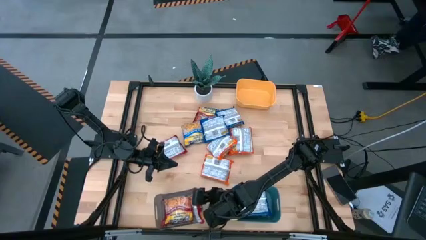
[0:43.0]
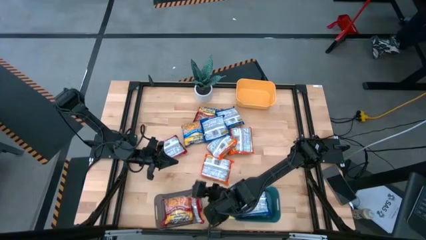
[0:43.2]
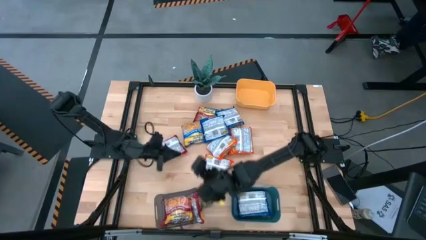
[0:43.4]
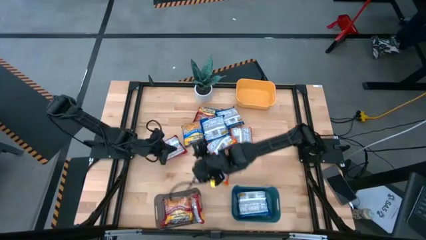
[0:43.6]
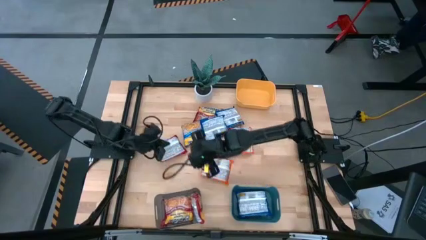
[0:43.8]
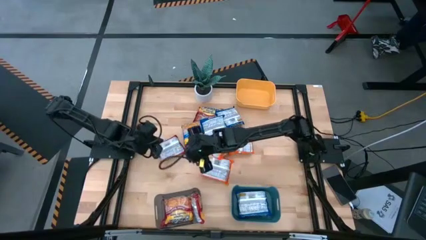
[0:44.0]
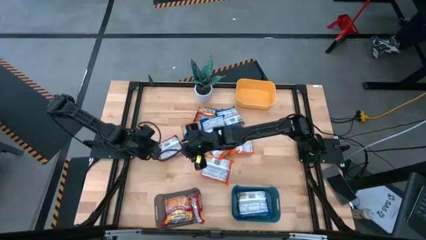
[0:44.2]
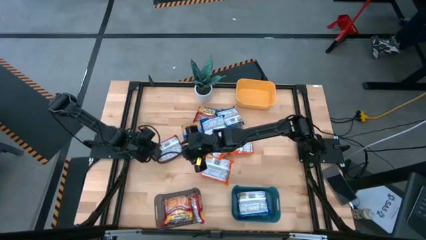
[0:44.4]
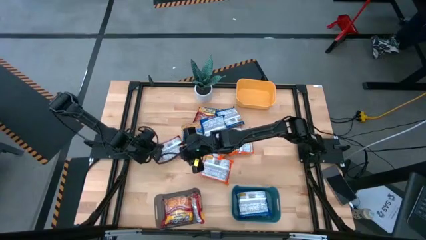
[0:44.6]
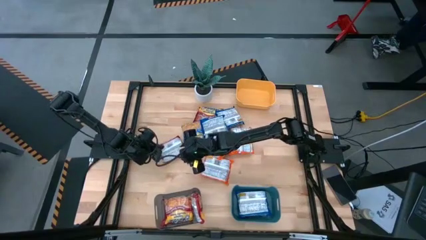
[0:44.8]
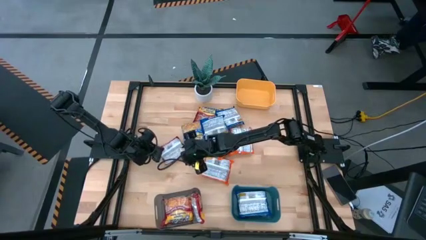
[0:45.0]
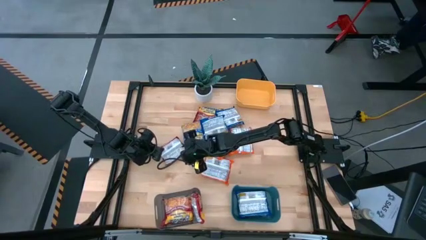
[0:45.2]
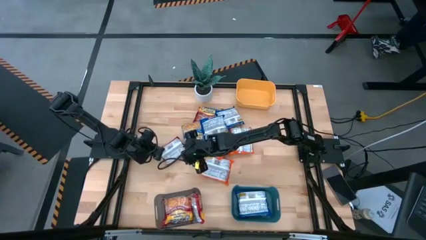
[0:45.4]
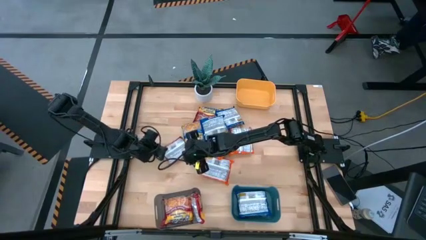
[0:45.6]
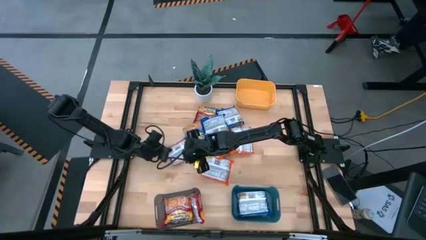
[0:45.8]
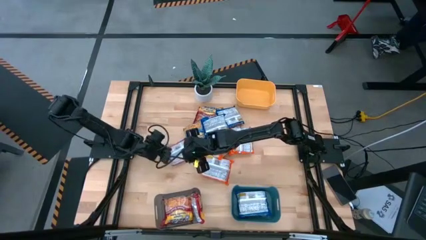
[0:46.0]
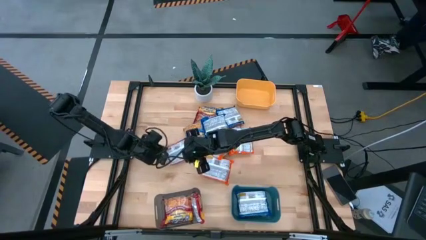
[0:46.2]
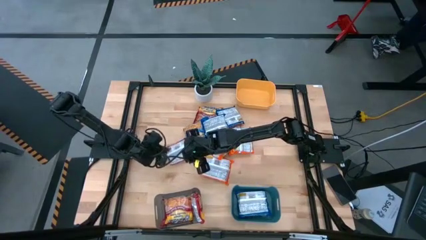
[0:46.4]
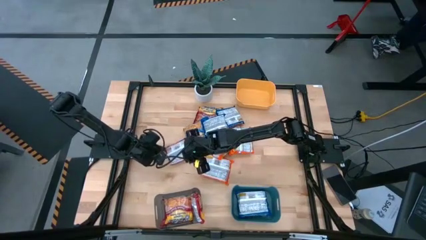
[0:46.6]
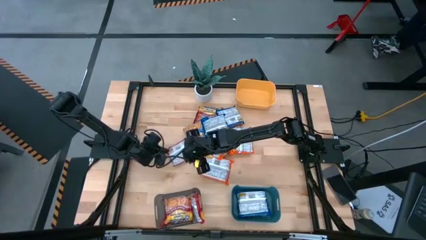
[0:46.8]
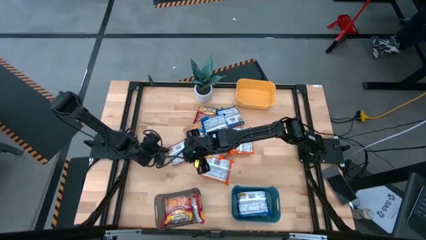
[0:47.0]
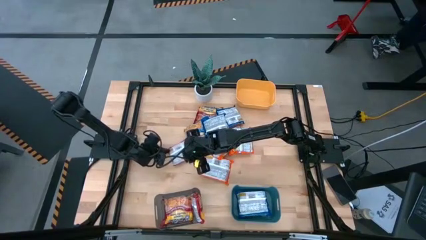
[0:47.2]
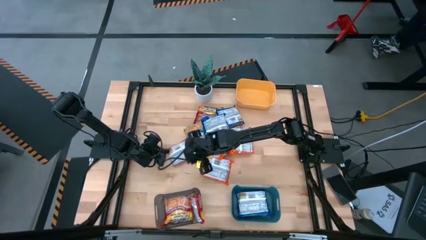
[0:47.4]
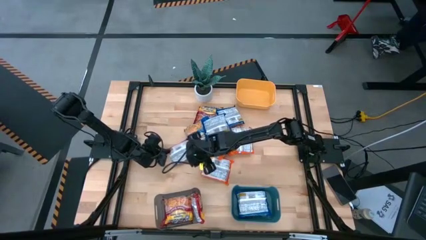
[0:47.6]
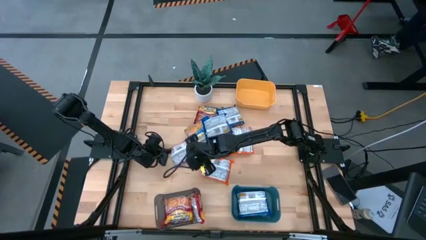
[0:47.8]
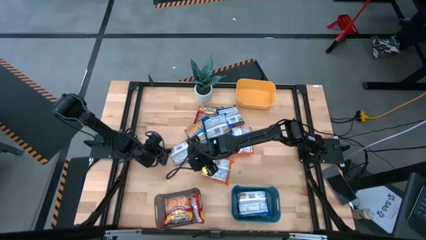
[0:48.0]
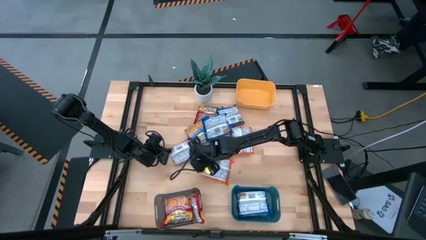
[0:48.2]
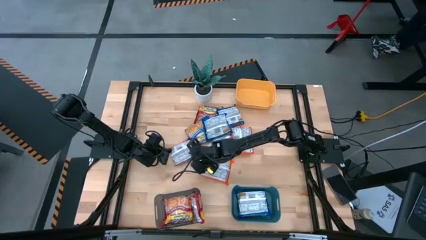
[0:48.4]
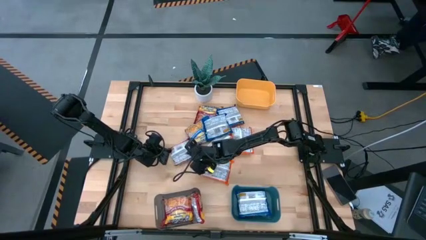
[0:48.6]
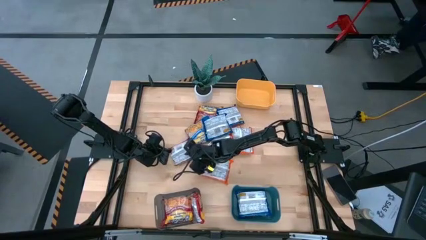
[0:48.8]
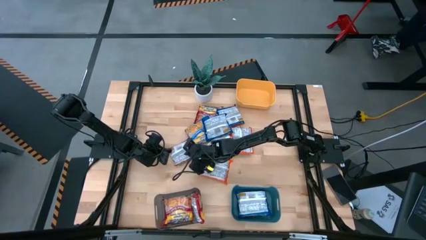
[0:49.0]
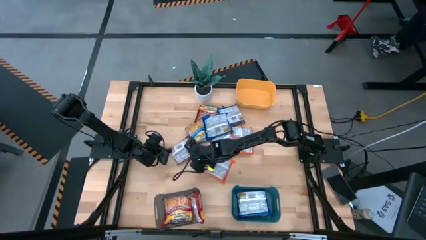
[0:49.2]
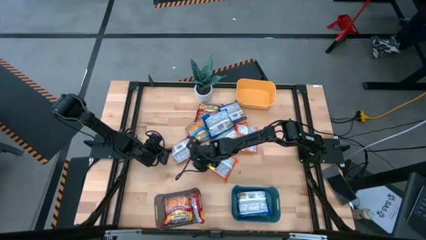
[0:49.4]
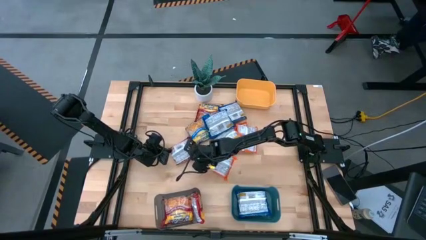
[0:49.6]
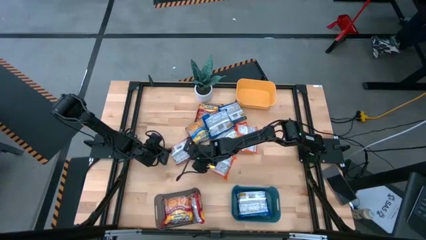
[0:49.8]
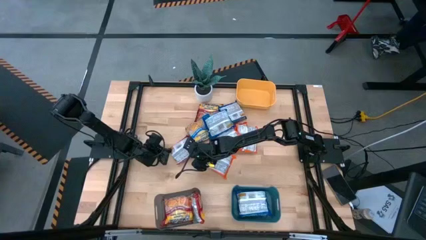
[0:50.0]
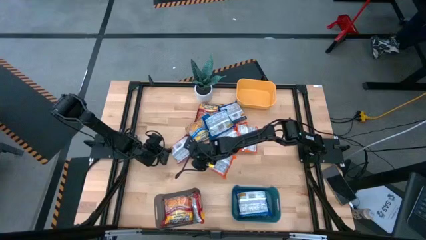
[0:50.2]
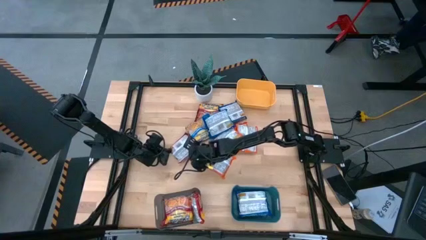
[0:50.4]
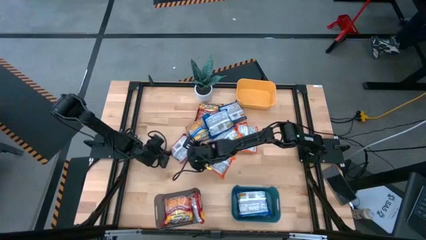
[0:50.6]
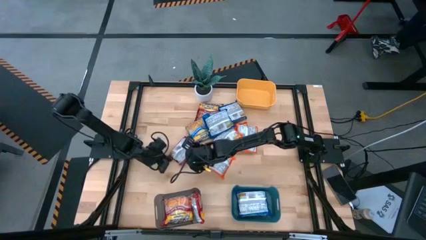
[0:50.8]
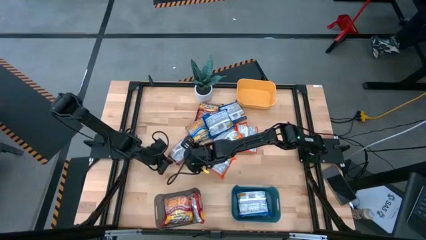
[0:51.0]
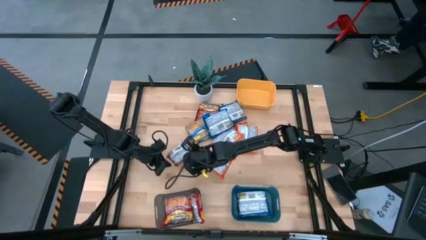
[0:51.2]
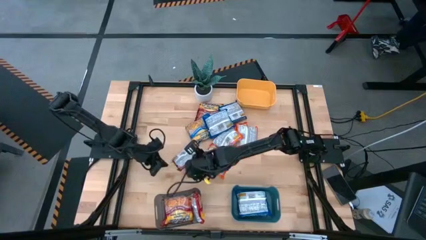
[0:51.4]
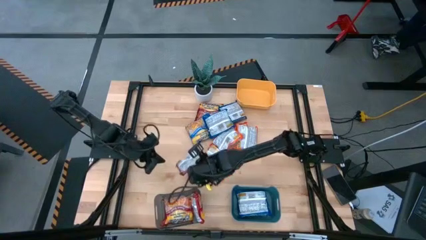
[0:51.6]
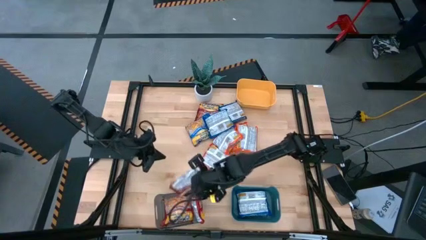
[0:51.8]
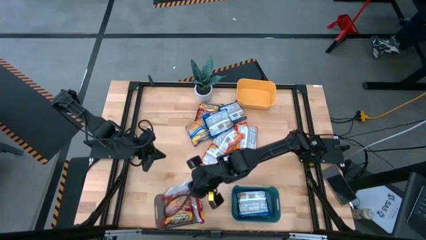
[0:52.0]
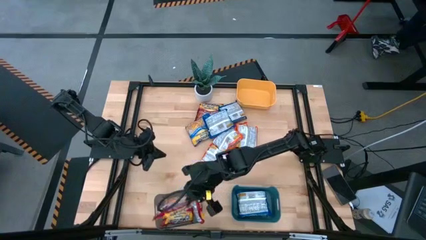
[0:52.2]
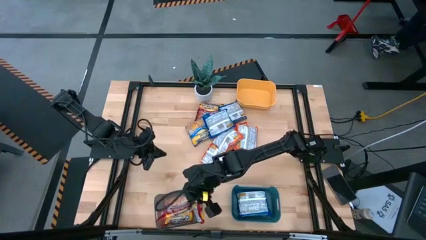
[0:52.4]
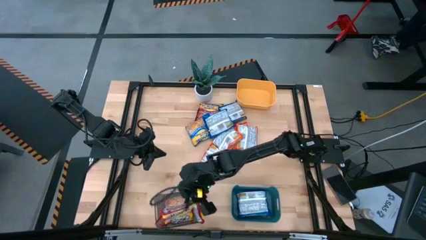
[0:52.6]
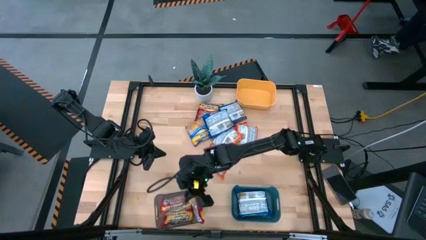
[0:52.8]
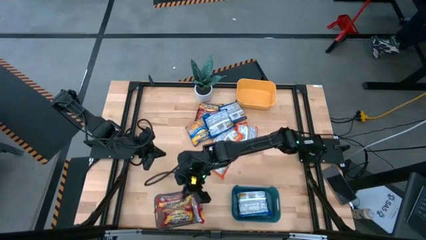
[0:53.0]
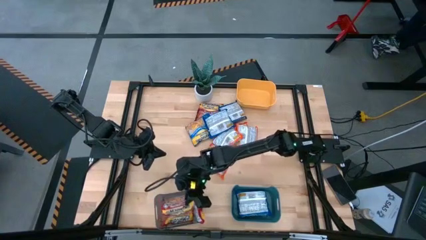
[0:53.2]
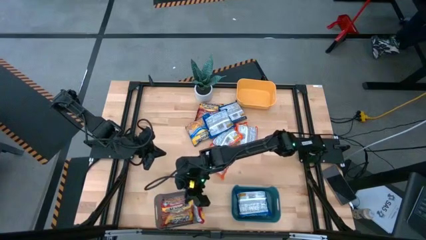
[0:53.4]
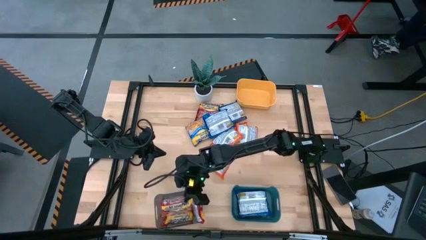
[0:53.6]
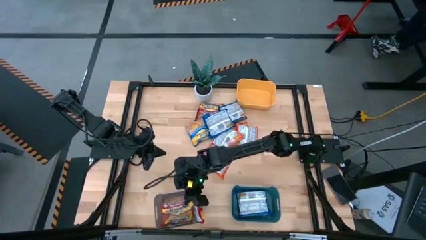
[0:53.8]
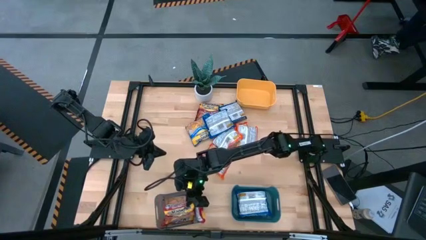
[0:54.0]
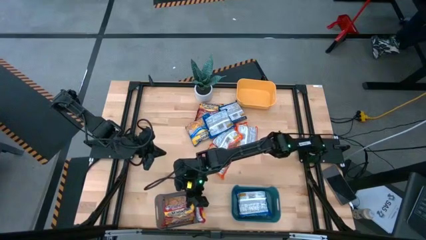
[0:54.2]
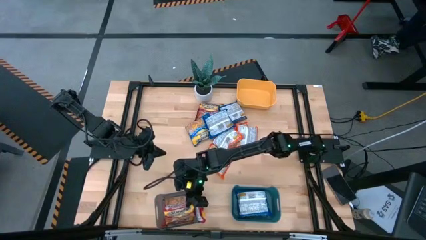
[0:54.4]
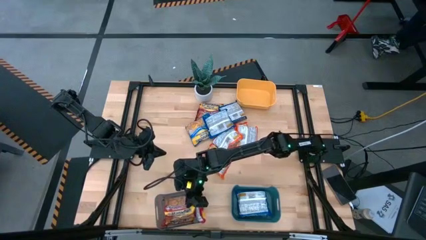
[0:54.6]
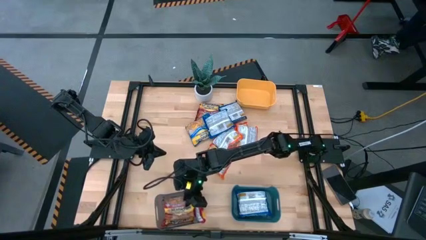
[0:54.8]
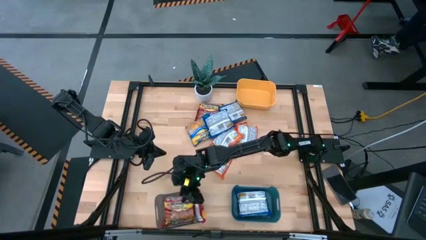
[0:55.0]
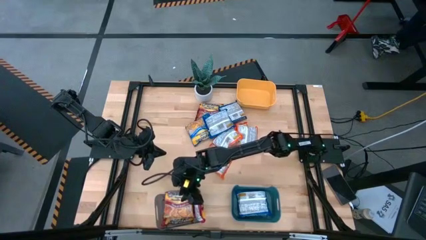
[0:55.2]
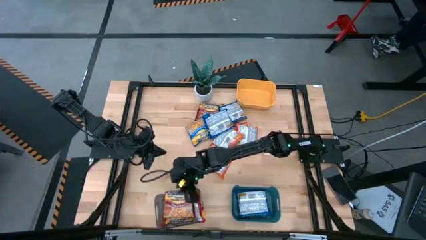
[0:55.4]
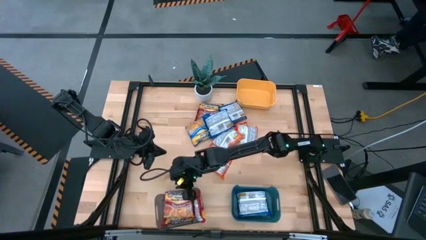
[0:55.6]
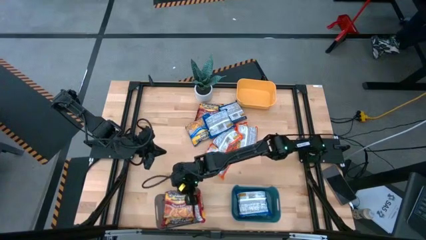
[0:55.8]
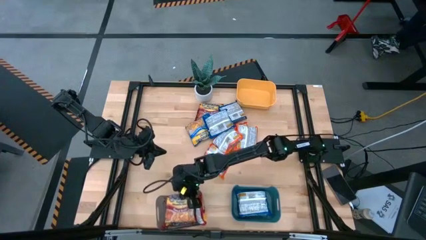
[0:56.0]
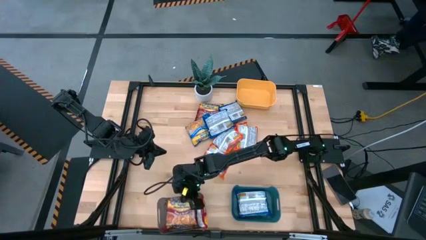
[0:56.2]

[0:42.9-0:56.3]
Task: Sort Maruchan noodles
Put the red noodle pack into the black bin
